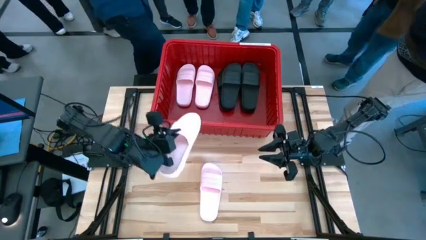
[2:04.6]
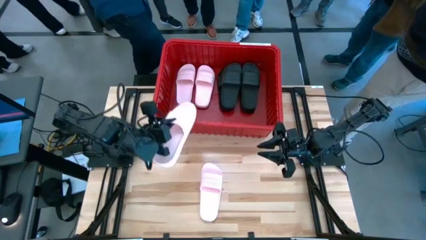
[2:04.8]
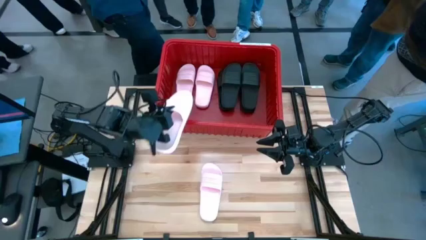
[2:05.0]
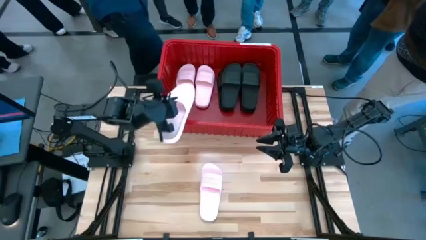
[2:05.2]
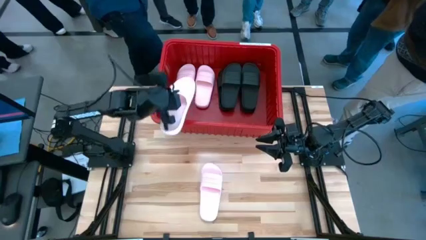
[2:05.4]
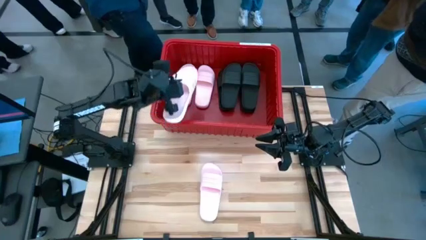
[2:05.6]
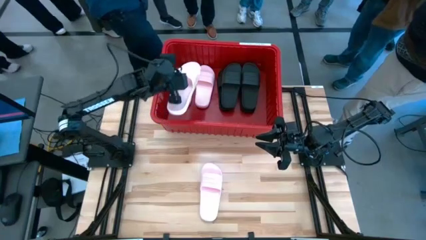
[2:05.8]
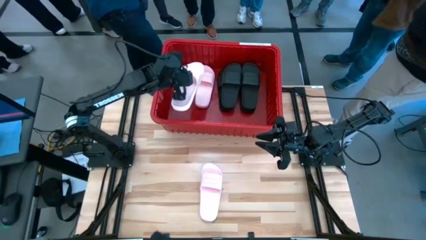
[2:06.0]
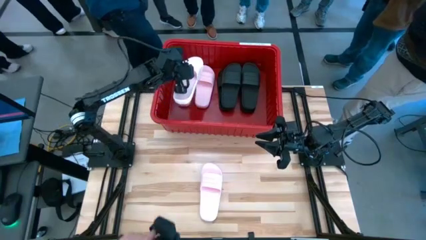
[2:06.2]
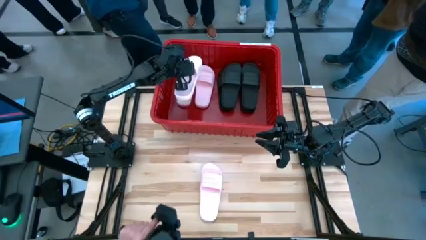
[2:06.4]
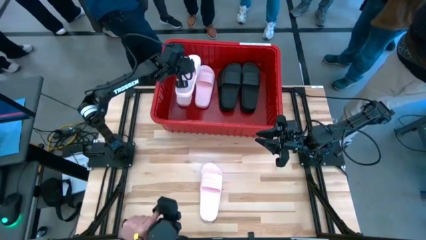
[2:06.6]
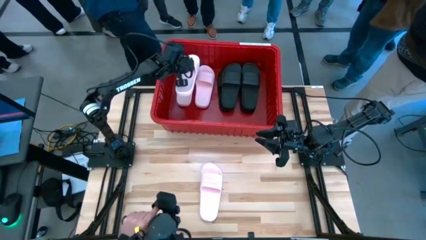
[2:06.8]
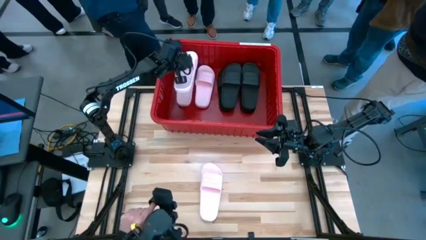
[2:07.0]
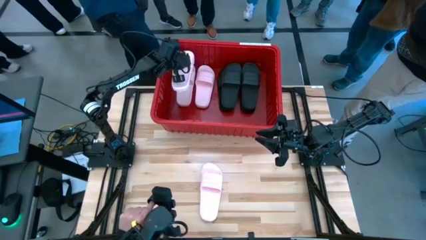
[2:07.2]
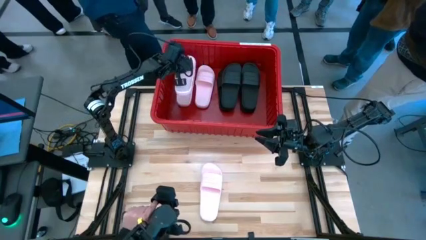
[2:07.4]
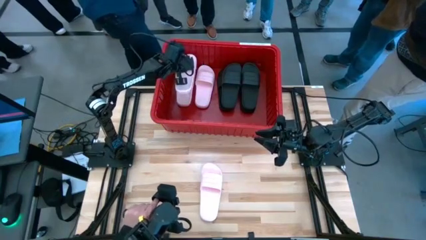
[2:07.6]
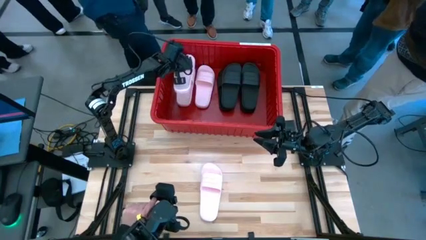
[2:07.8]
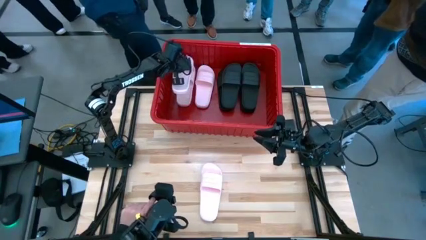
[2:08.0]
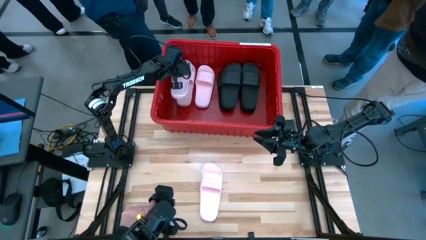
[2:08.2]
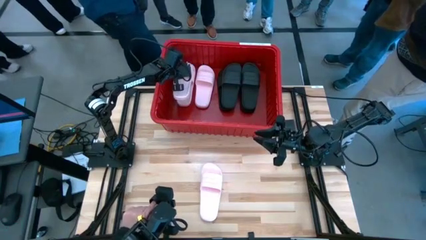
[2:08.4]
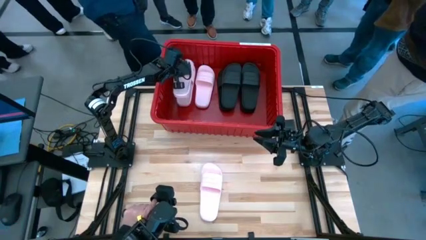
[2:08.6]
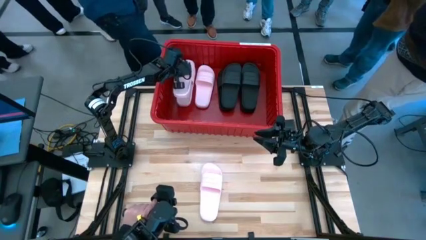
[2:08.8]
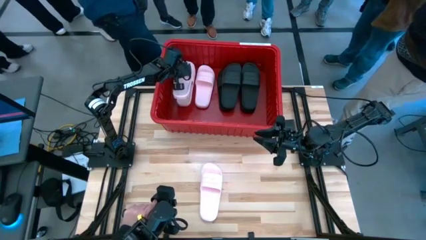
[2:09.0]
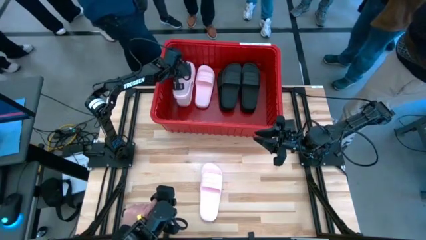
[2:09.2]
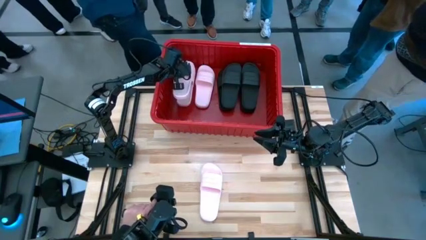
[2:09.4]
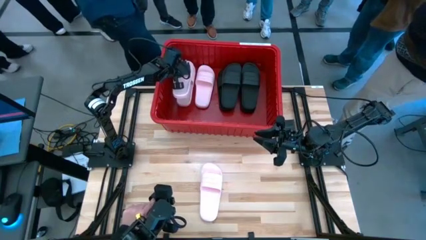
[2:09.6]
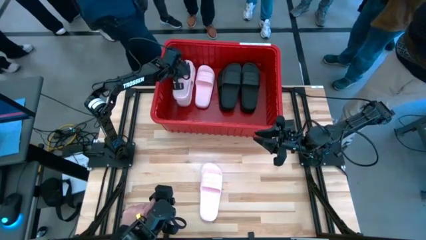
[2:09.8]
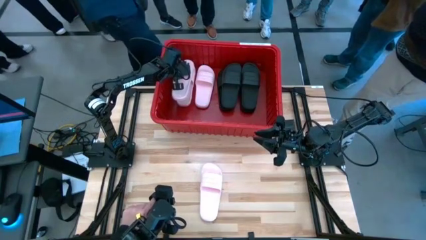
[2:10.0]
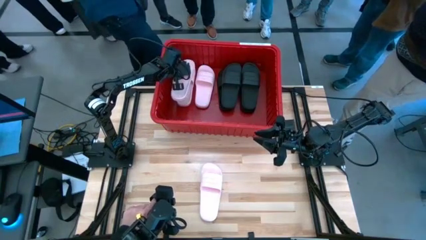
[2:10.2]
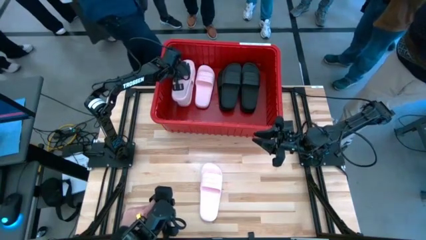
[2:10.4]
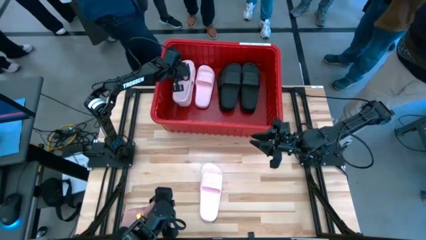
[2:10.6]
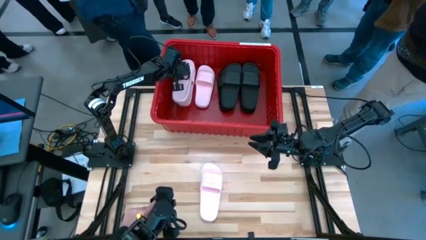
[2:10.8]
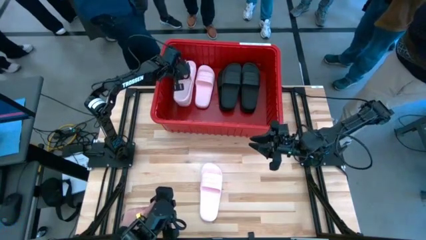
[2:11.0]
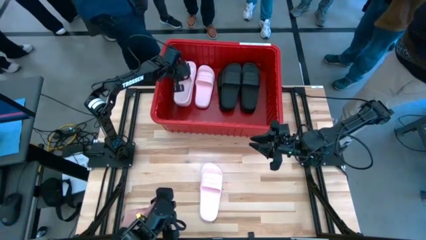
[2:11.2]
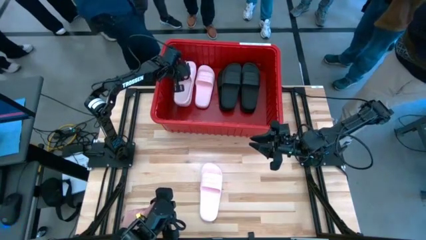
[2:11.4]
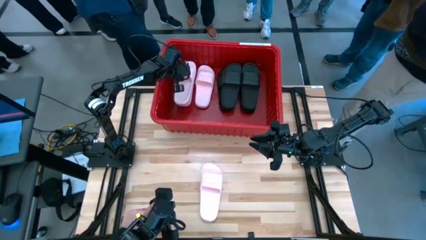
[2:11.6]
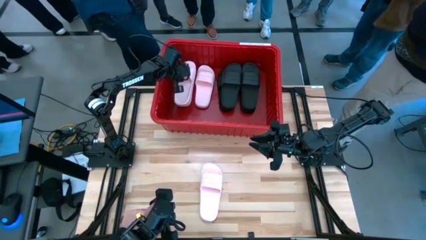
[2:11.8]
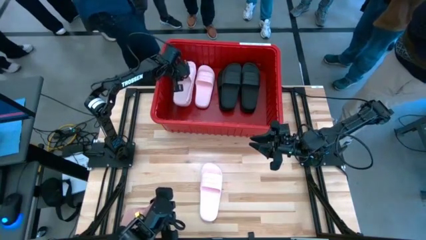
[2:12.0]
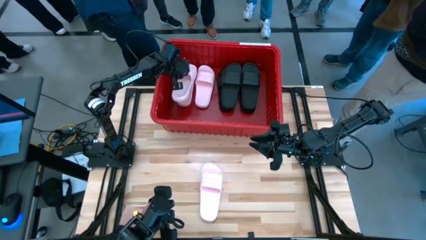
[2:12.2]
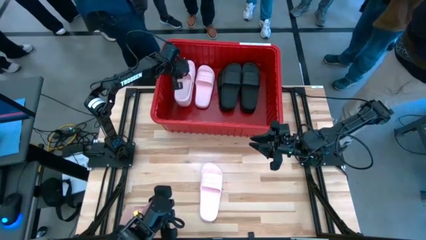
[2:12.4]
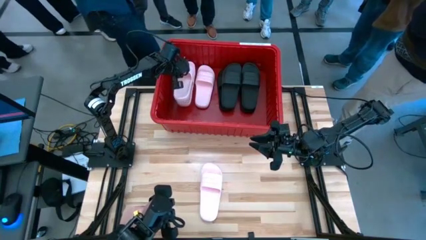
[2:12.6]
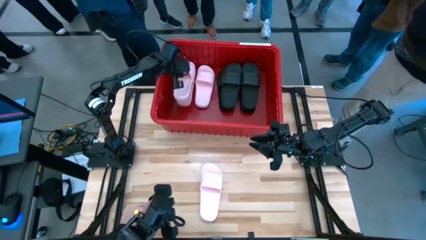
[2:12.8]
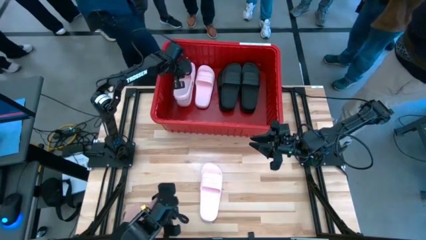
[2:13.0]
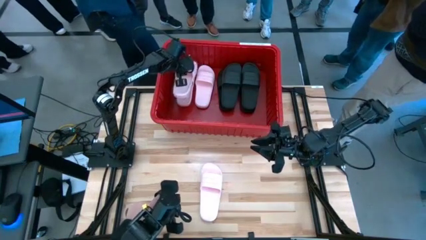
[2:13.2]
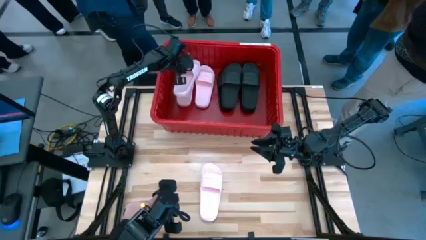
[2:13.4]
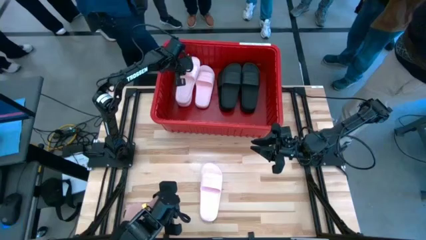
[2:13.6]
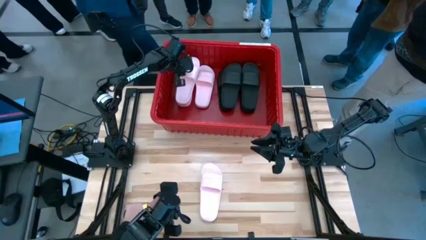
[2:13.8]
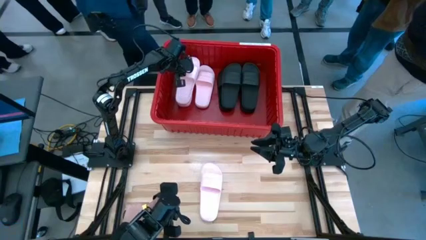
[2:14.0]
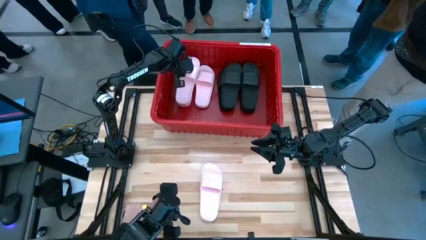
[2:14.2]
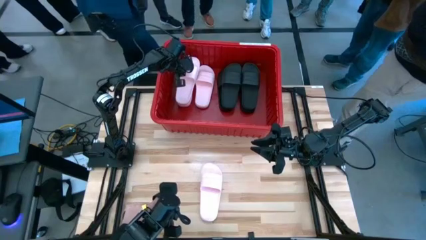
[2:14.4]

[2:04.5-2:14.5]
Task: Pick and place slides into bin
Put the pink slide into the red container

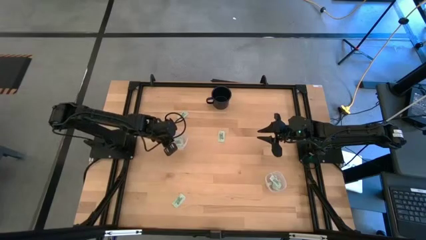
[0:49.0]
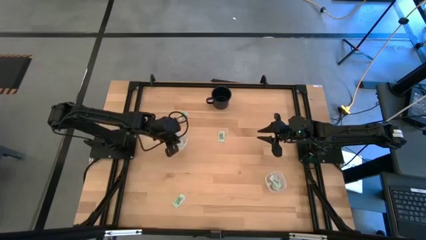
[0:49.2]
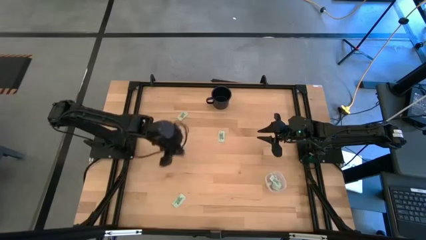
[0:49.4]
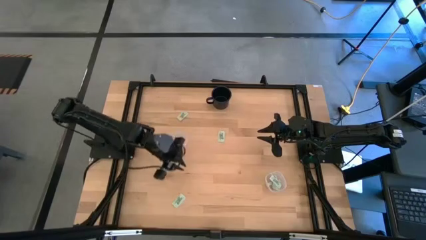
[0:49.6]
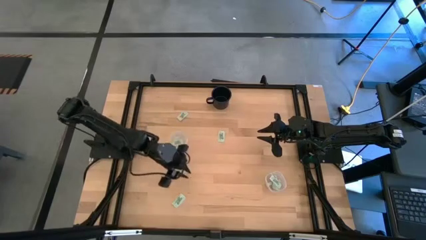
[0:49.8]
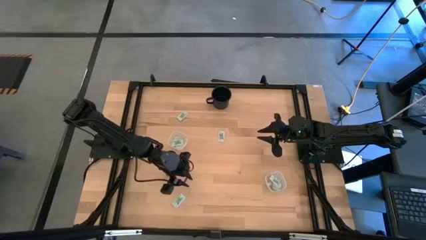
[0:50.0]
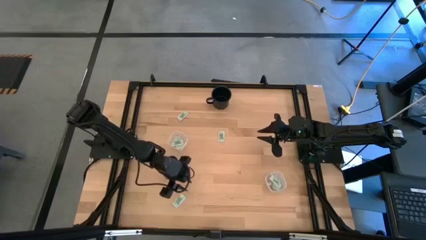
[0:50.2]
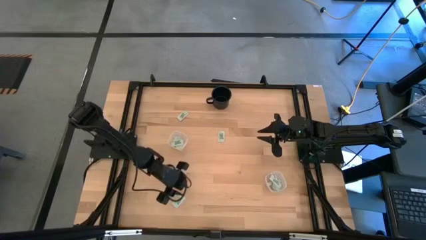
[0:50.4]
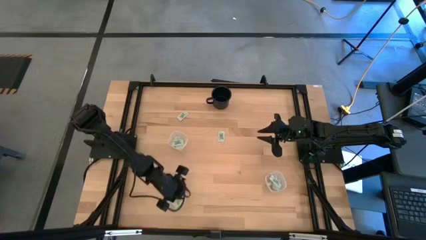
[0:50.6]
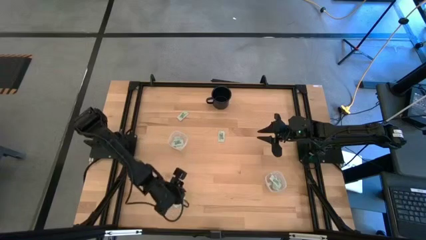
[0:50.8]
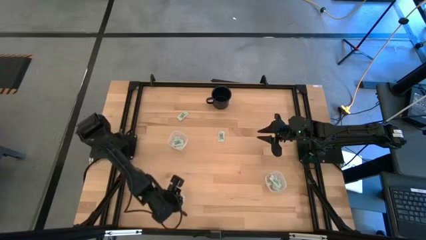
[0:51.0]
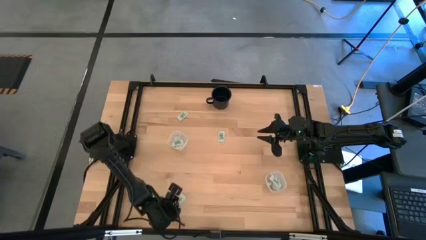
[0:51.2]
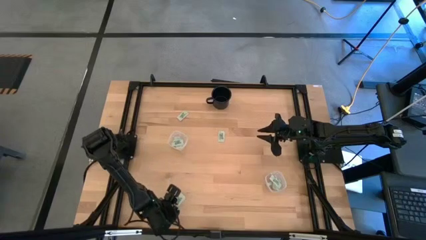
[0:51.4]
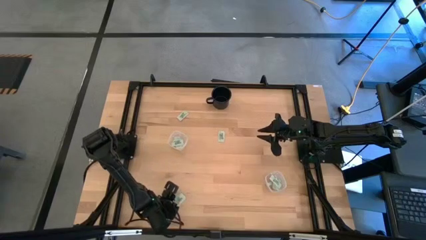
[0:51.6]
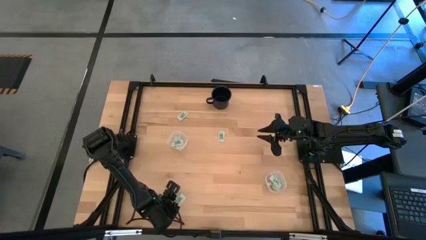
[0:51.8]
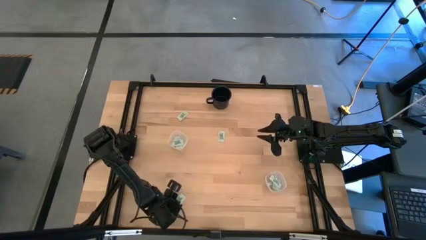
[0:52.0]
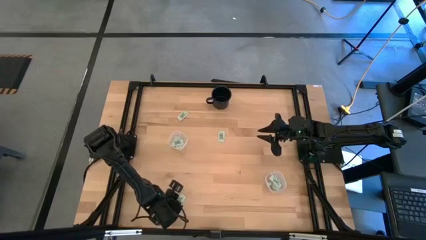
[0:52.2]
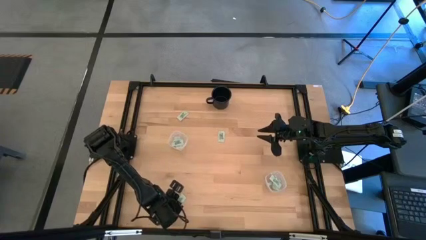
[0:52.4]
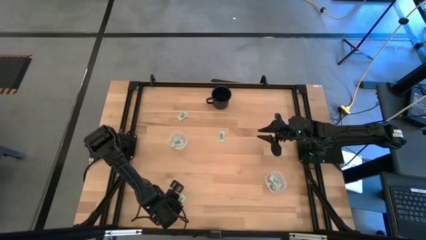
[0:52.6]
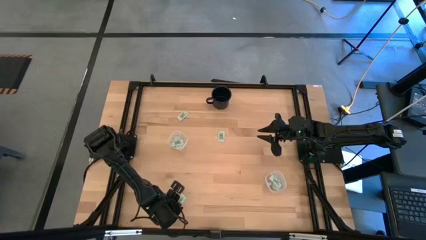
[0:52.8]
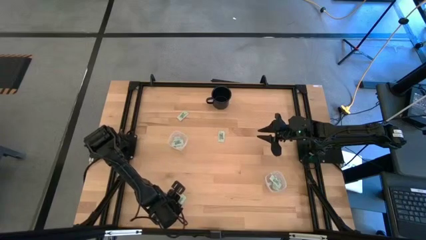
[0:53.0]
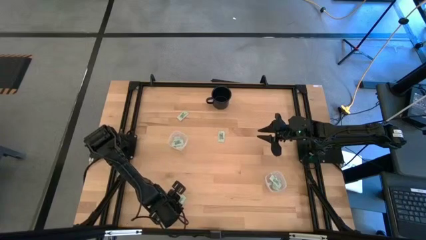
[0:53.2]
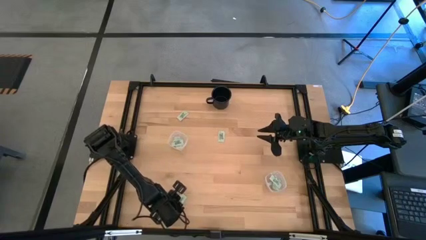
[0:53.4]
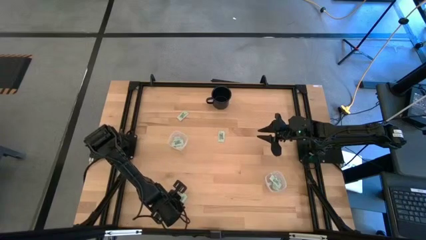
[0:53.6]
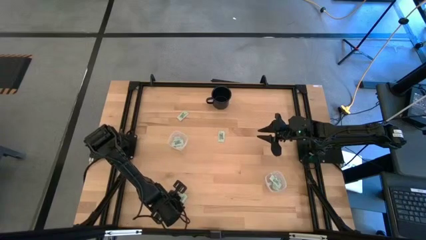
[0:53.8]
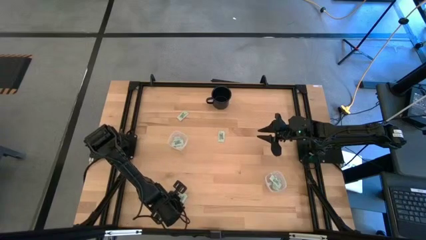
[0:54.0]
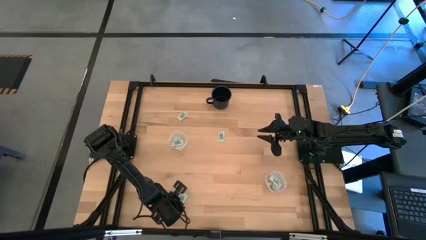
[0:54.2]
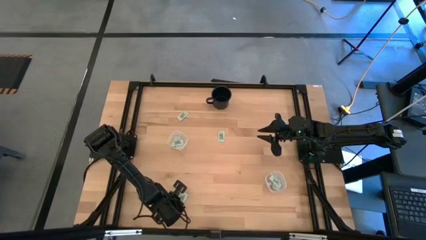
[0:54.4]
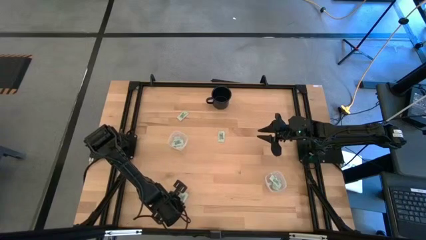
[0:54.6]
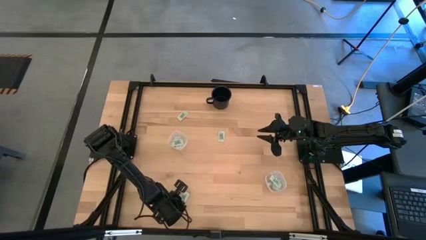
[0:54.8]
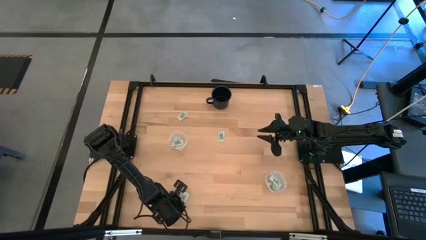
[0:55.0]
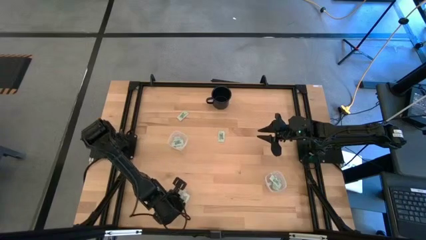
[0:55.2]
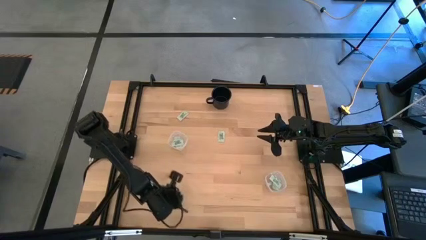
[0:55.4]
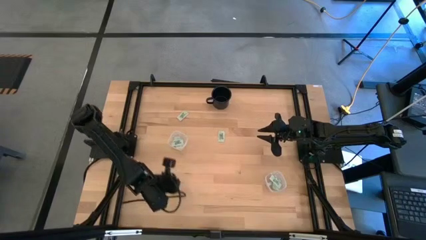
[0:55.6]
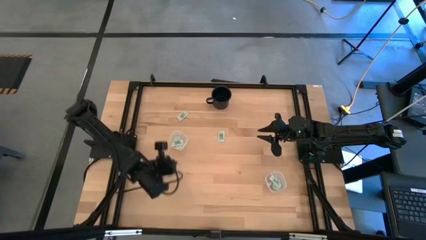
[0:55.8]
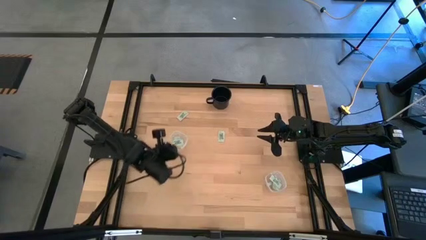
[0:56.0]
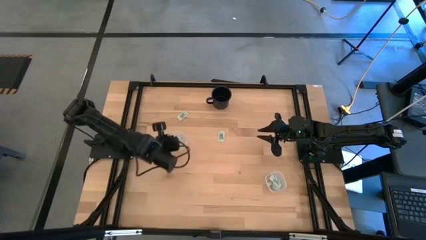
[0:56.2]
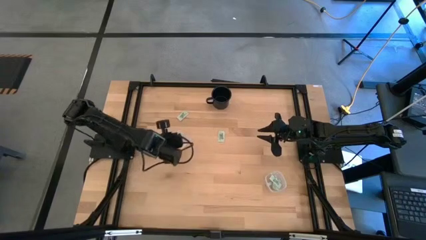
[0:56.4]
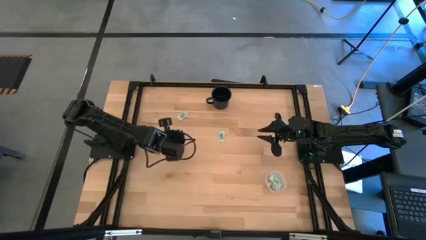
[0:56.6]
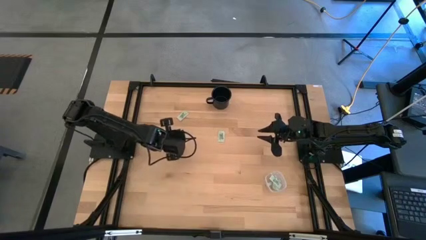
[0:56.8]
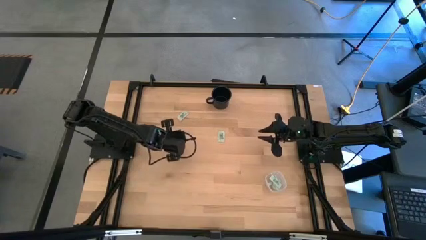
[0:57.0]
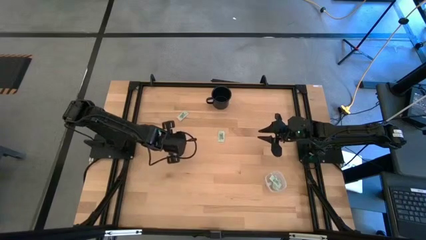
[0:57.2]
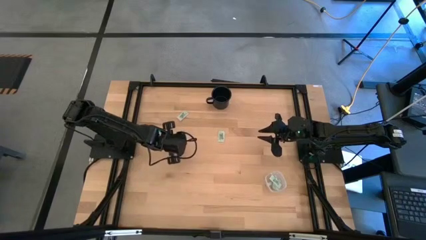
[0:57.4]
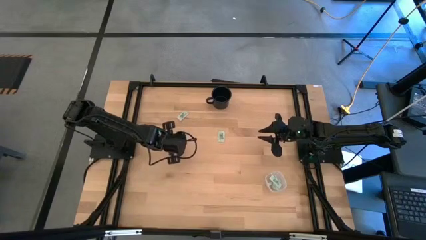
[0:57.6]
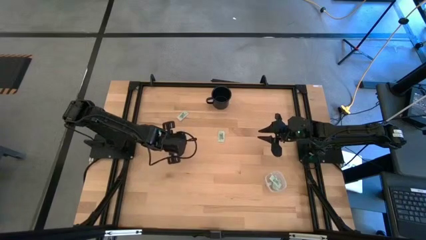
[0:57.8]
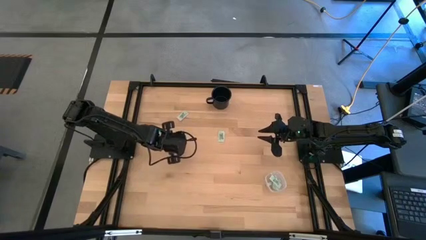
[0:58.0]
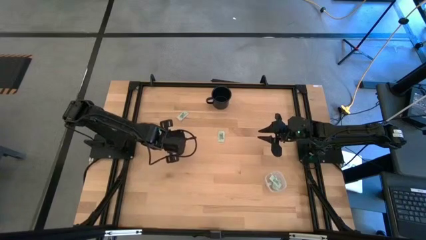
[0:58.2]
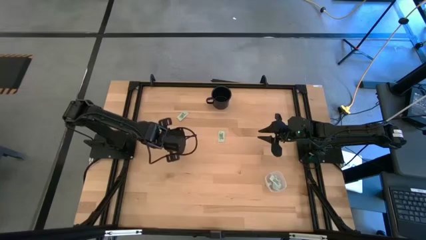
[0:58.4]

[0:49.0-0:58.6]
Task: Pick and place items into bin
Put the white stevia packet into the top transparent bin
